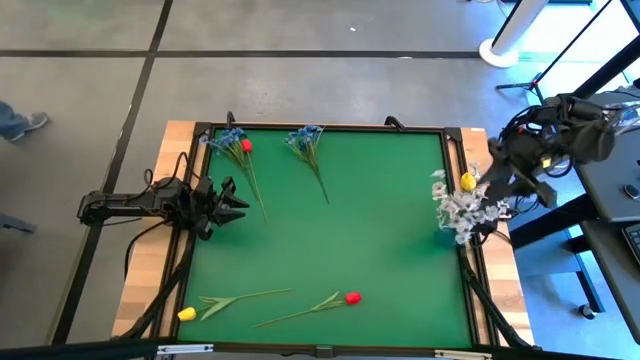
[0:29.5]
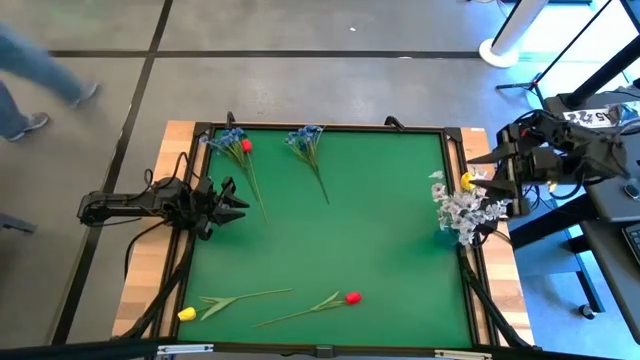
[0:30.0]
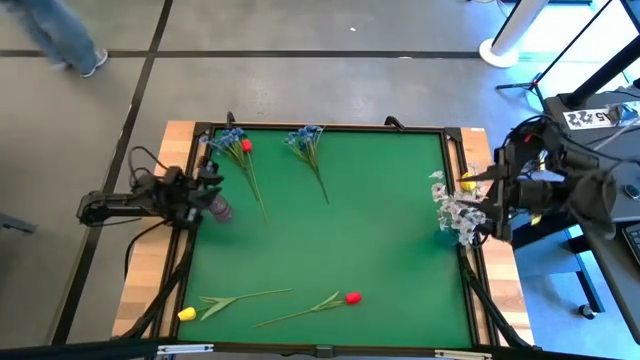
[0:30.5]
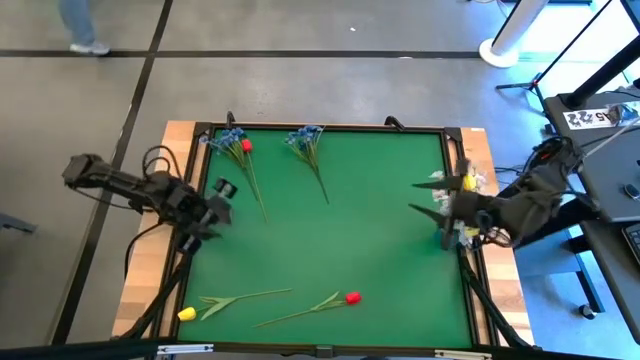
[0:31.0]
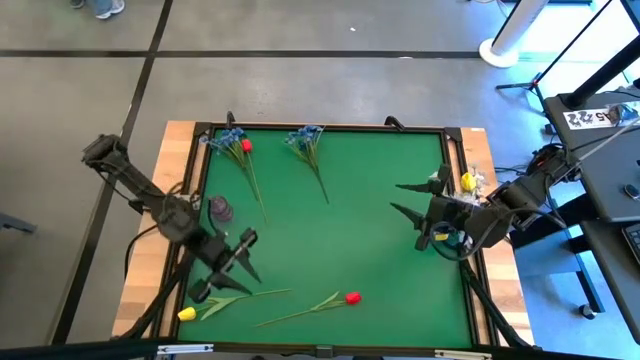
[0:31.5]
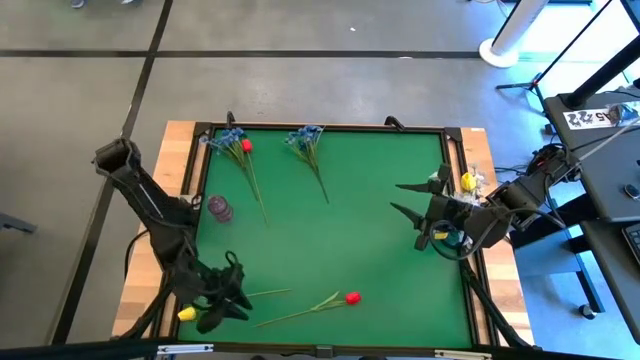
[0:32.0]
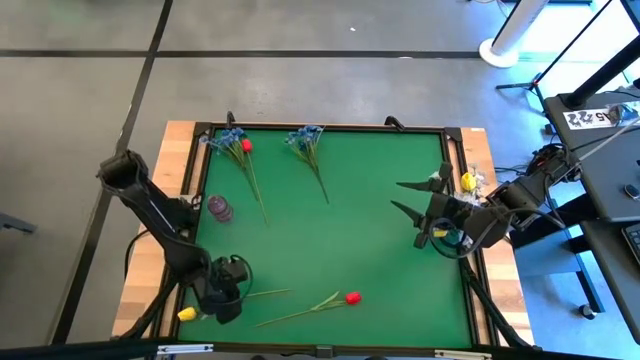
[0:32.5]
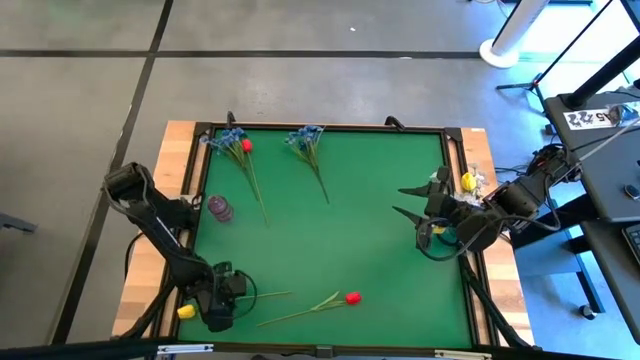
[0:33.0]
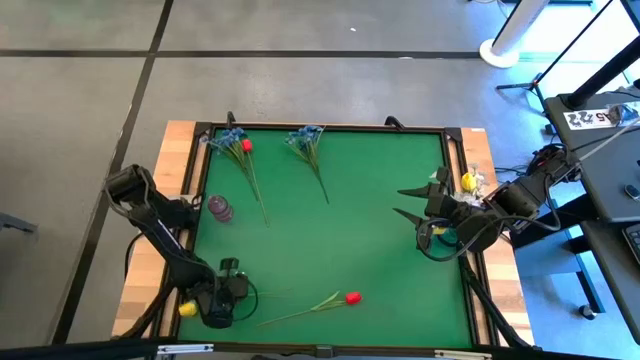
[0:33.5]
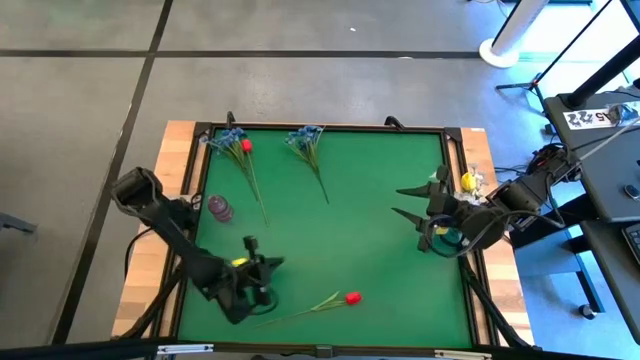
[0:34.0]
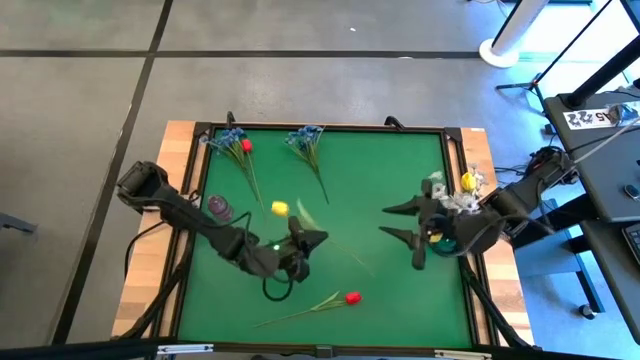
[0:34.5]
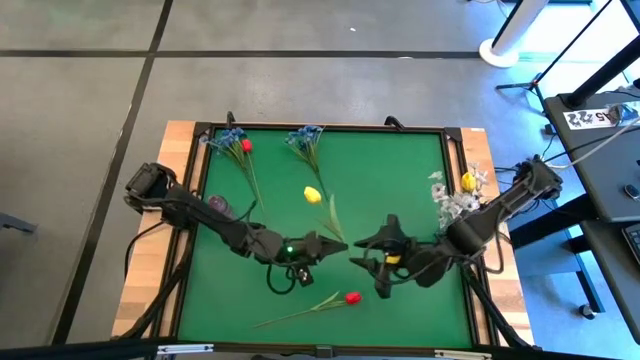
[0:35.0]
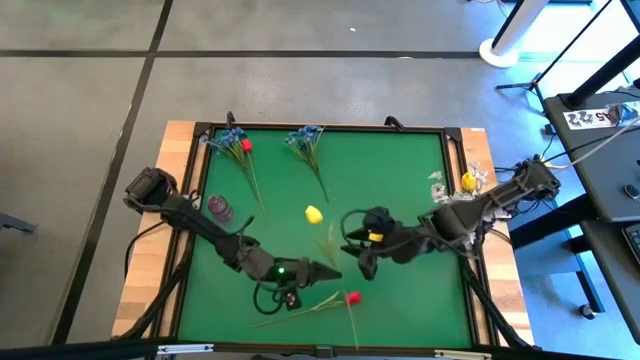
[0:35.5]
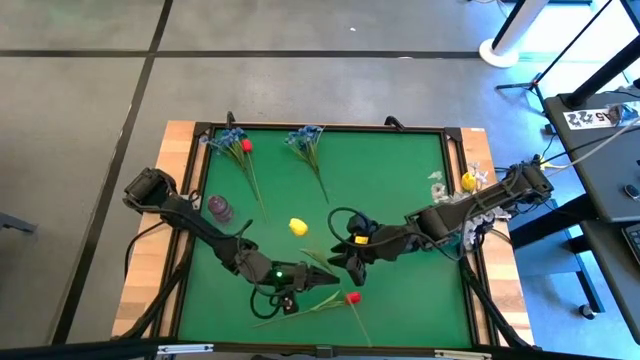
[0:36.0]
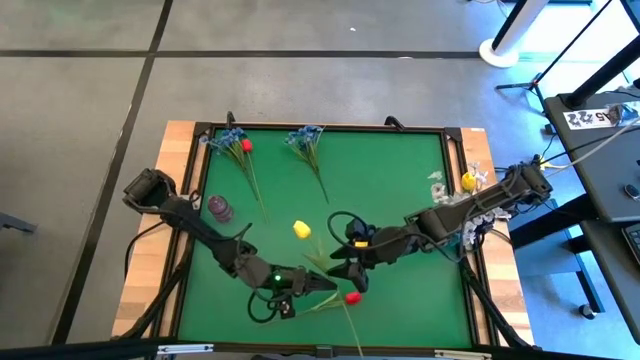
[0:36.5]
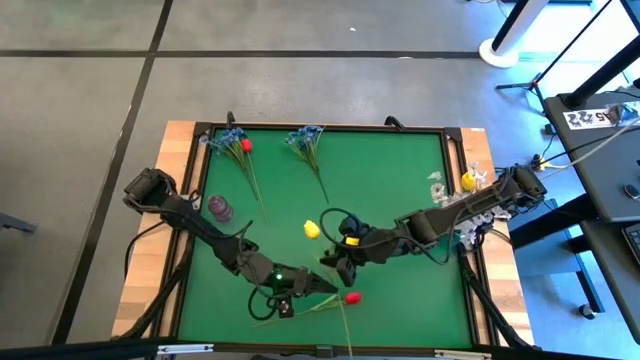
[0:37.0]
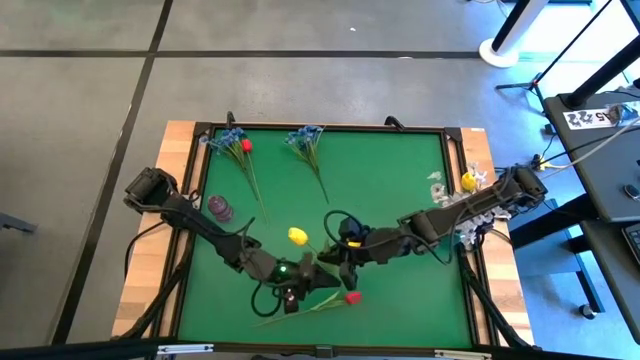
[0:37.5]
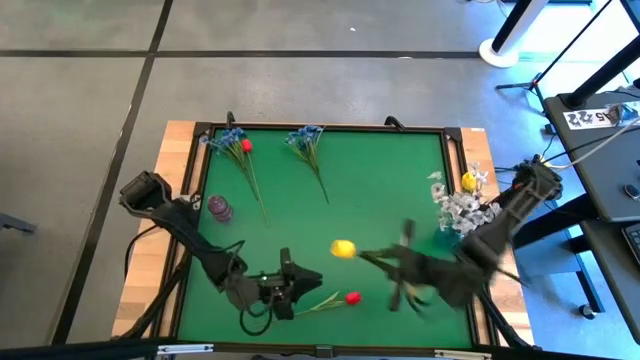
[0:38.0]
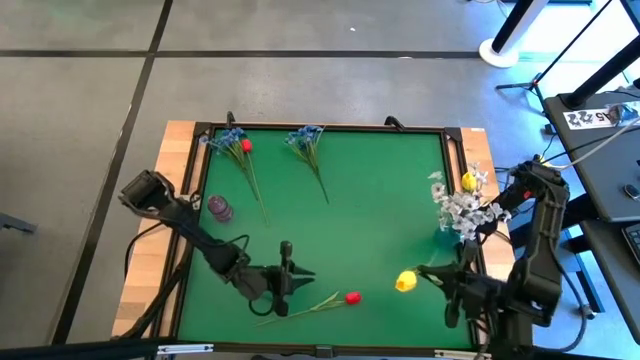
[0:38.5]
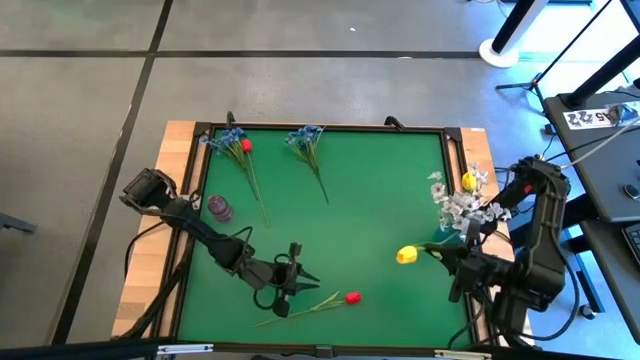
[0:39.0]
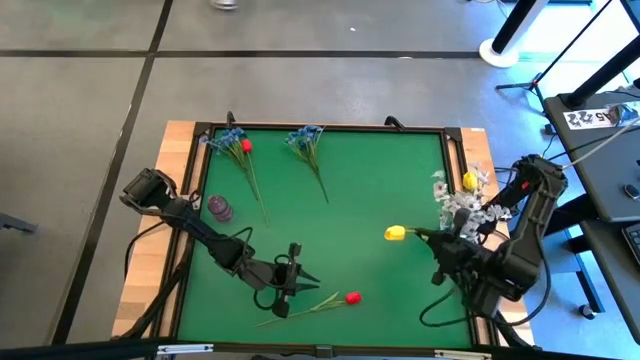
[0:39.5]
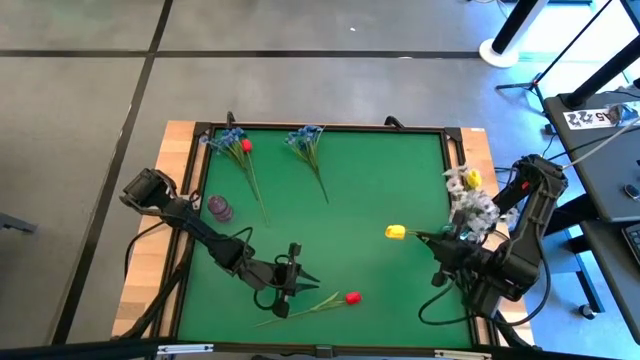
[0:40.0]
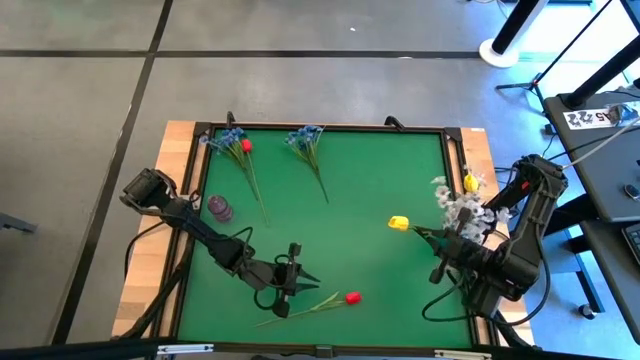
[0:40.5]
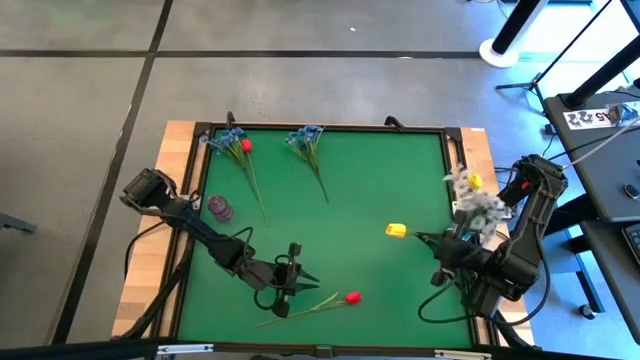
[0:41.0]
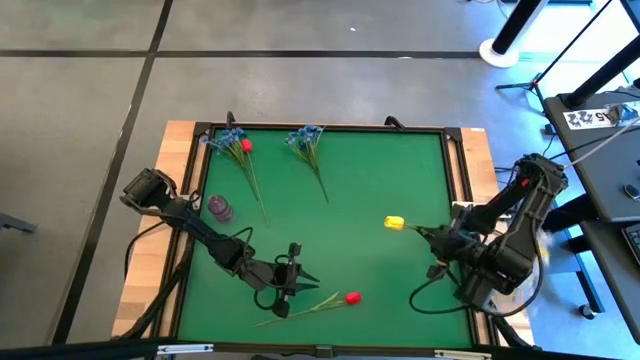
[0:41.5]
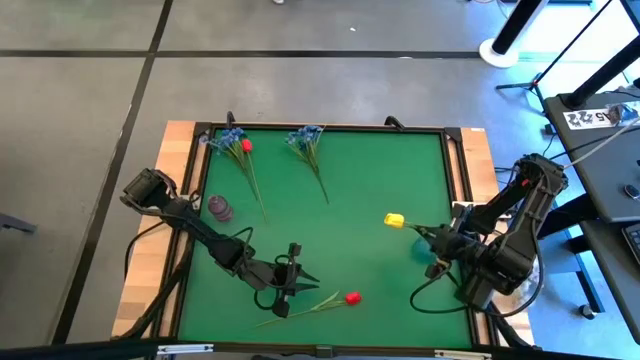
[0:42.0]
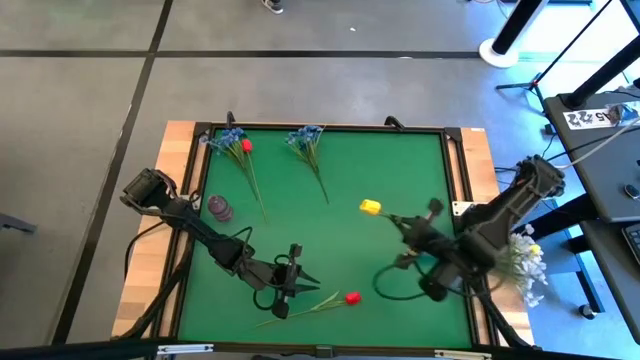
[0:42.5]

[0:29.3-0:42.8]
Task: Sort flowers into vase by color
Put the yellow flower into the blue vase

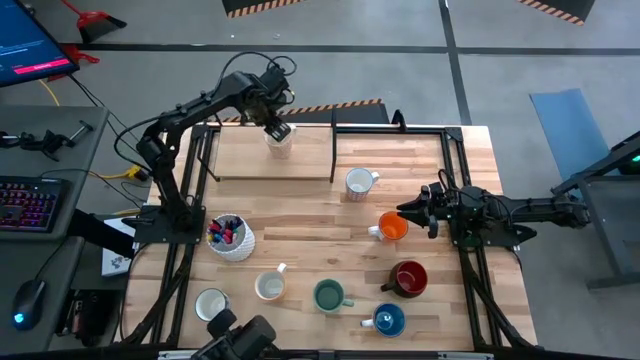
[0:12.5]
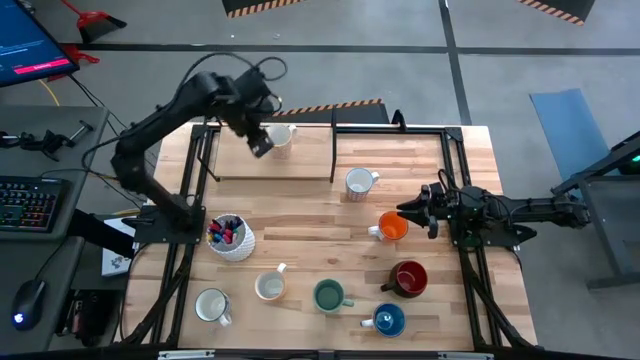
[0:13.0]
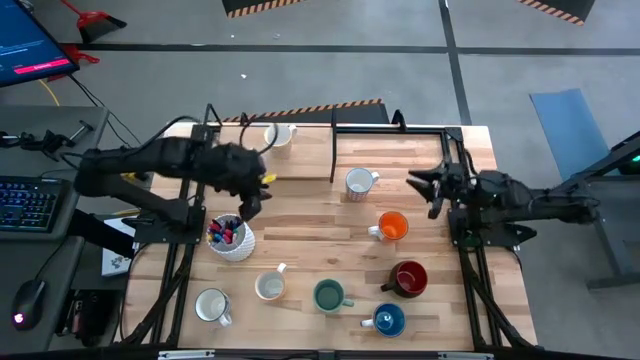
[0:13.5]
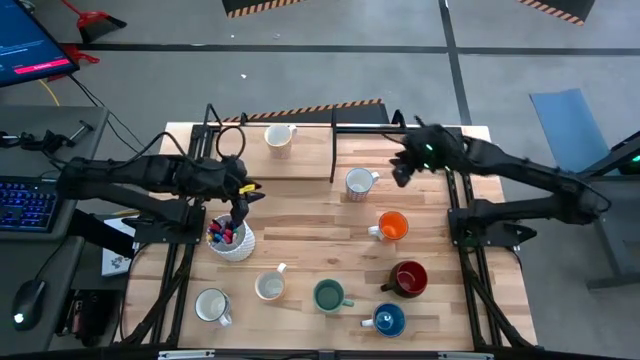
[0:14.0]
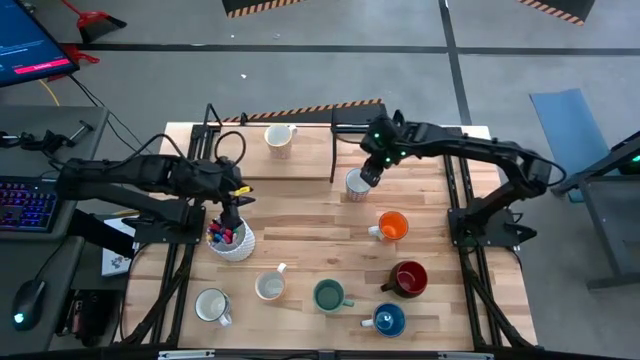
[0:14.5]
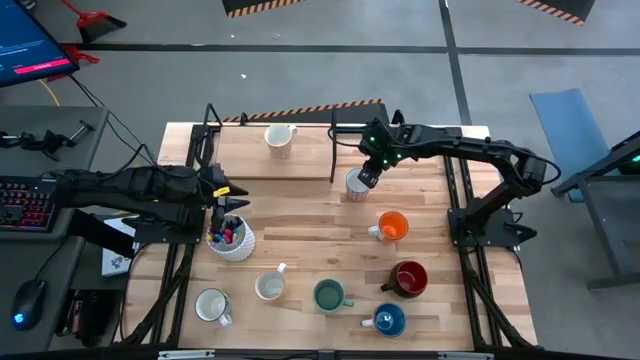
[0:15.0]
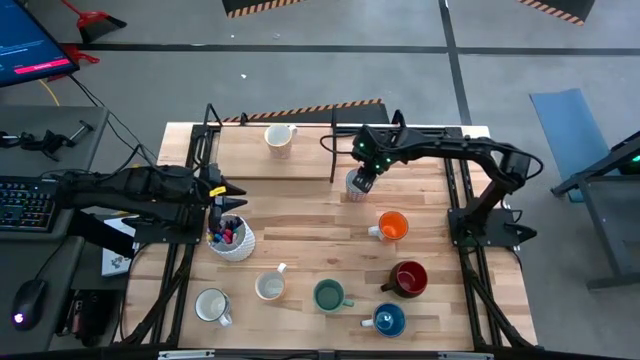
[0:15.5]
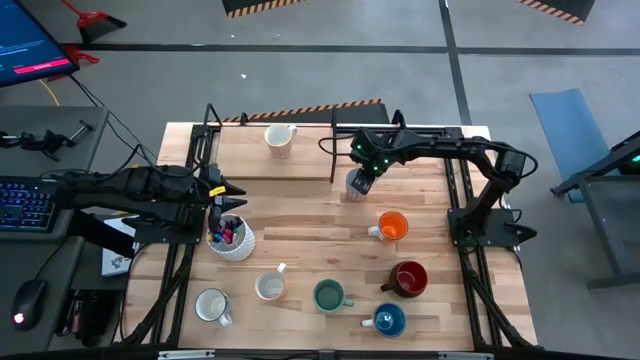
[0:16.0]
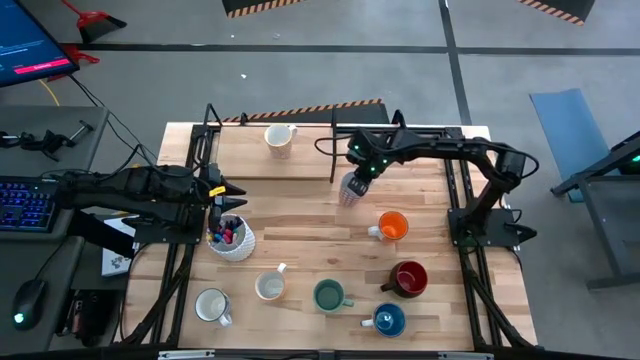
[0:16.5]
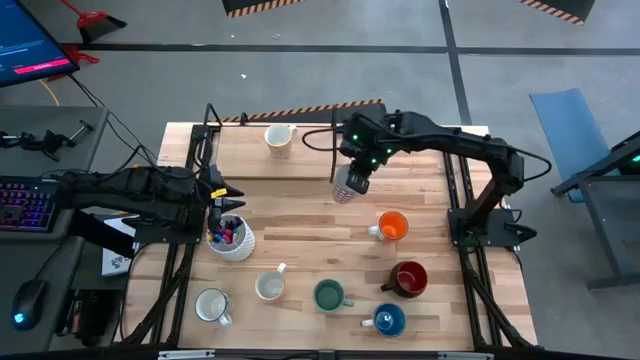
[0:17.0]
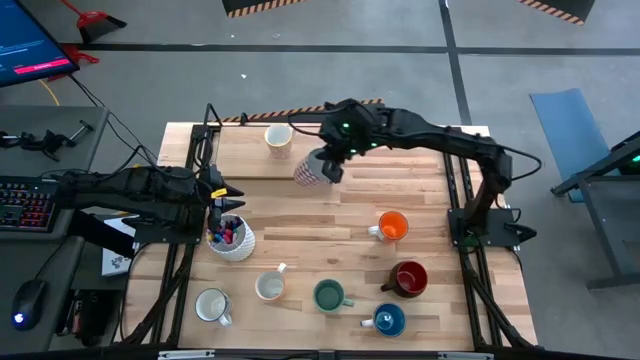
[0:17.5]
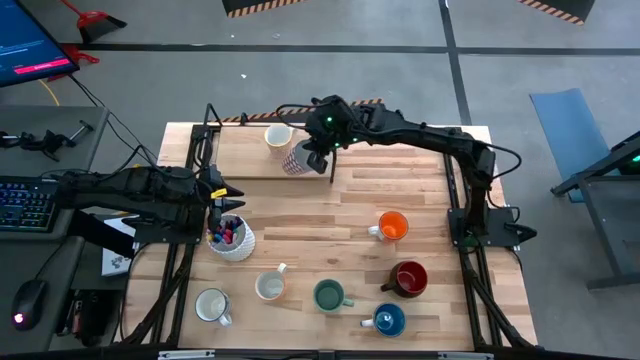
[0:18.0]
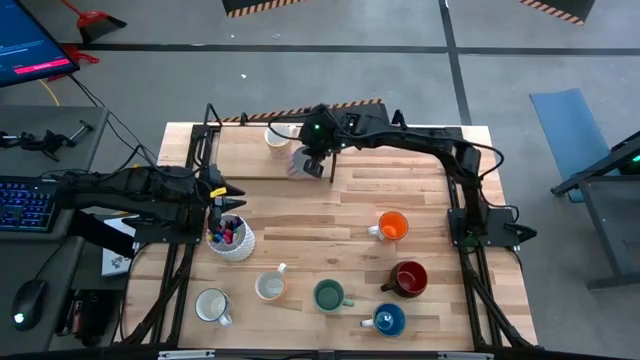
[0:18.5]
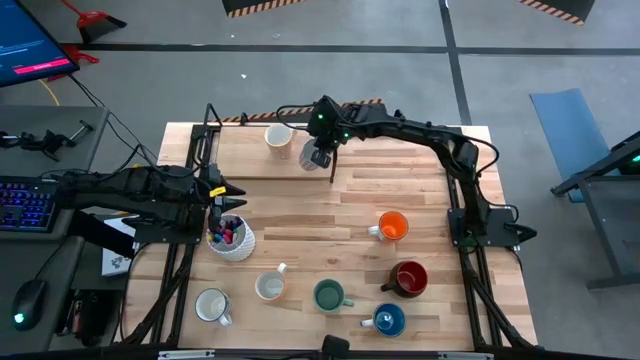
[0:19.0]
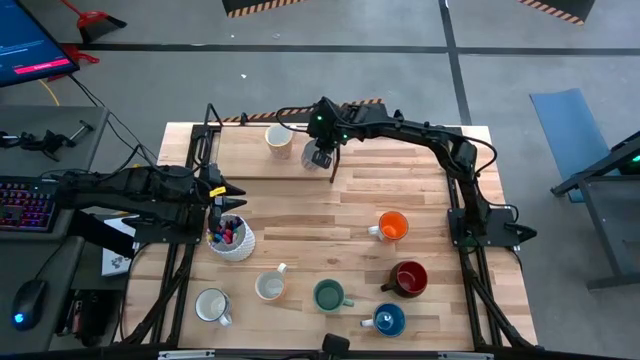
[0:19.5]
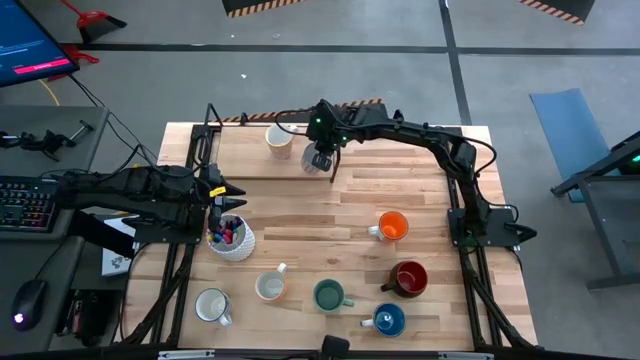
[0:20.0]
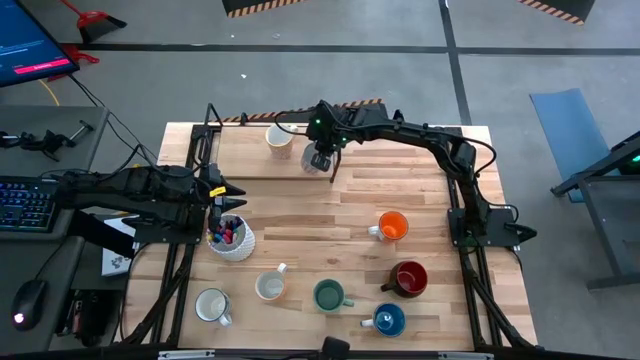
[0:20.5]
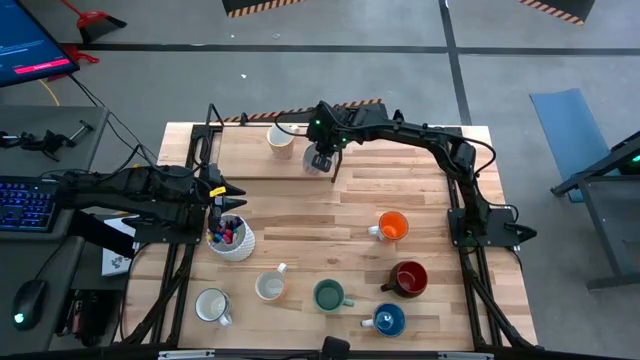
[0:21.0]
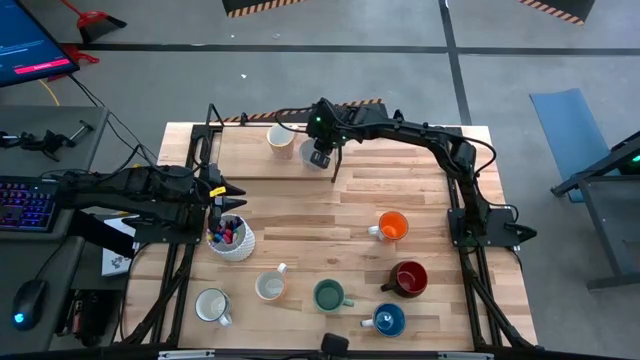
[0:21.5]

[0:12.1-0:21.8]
Task: Place coffee mugs
Put the red patterned mug on the shelf
